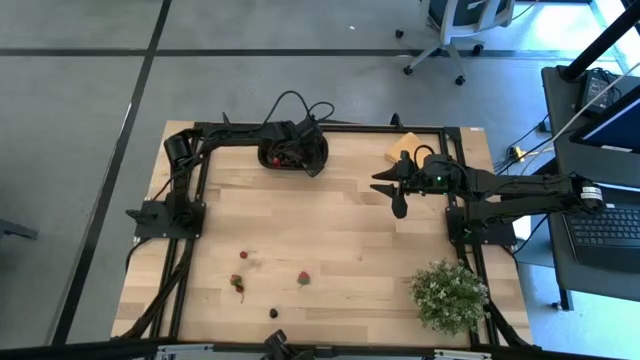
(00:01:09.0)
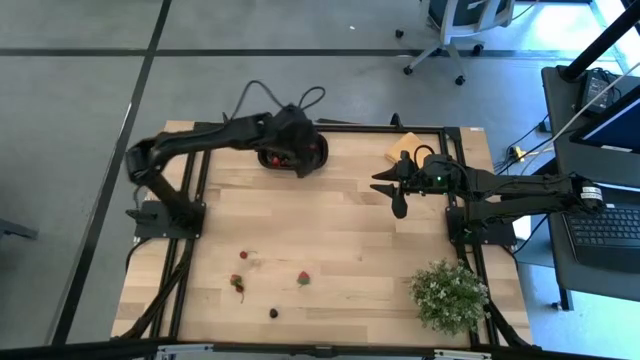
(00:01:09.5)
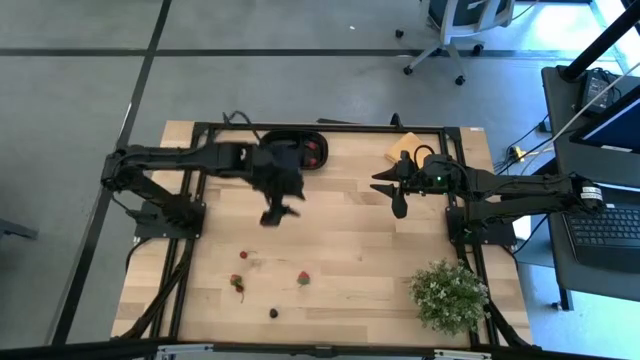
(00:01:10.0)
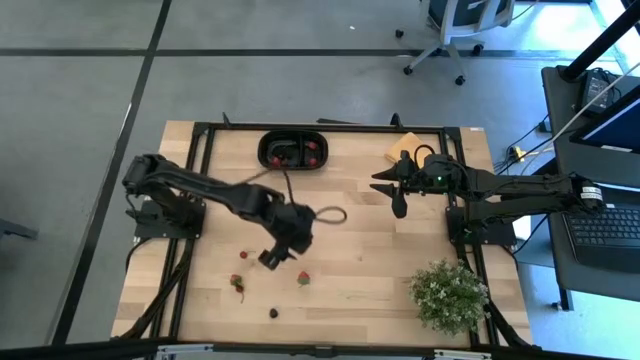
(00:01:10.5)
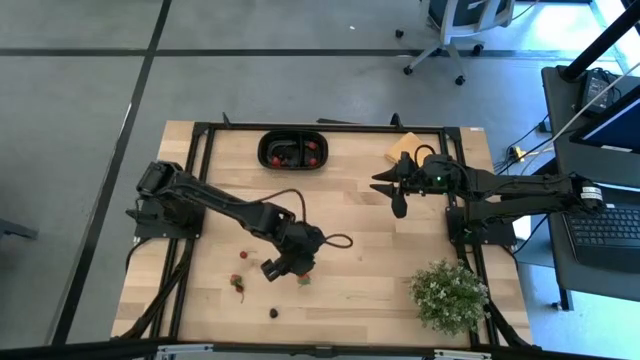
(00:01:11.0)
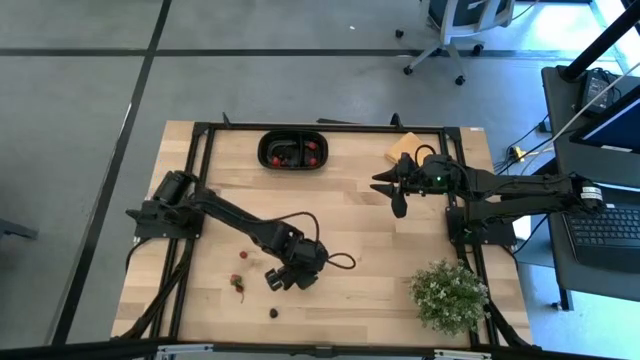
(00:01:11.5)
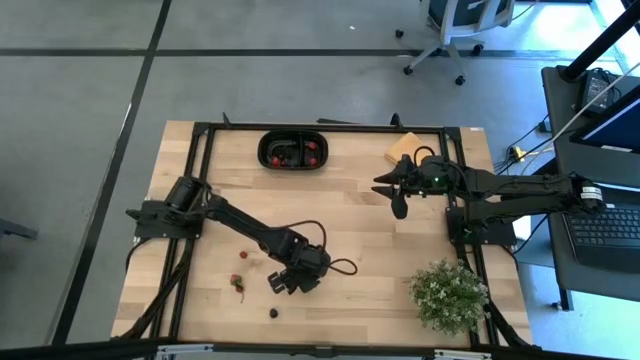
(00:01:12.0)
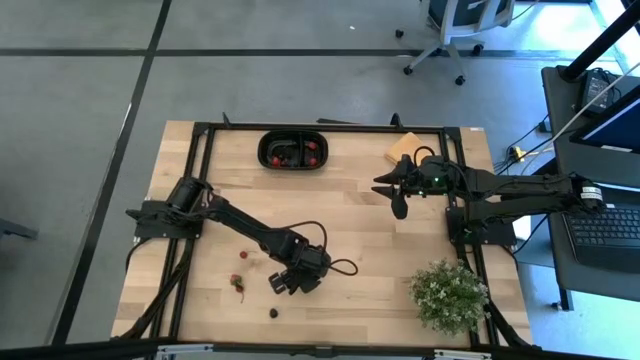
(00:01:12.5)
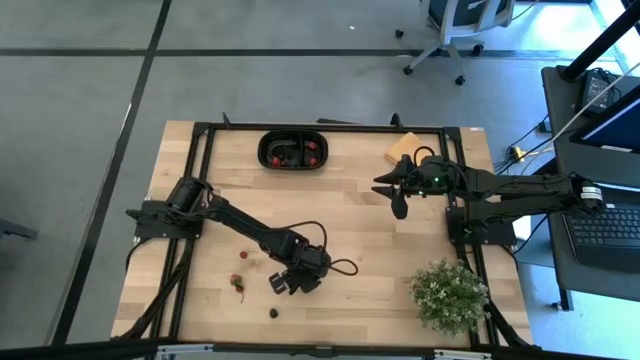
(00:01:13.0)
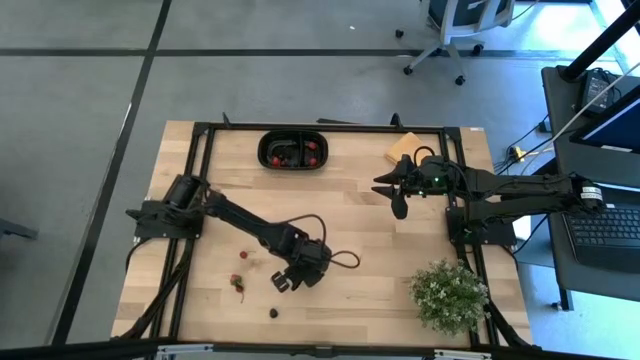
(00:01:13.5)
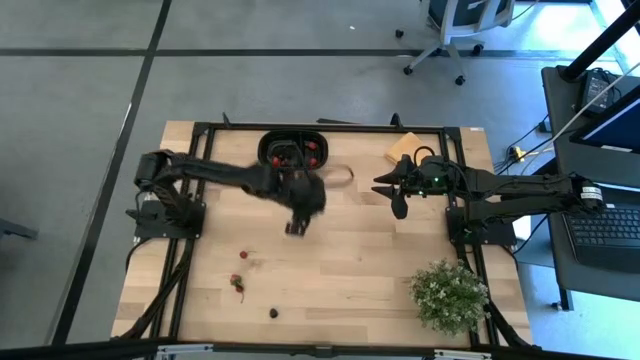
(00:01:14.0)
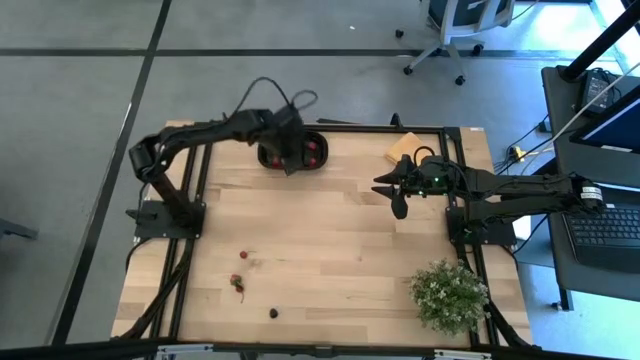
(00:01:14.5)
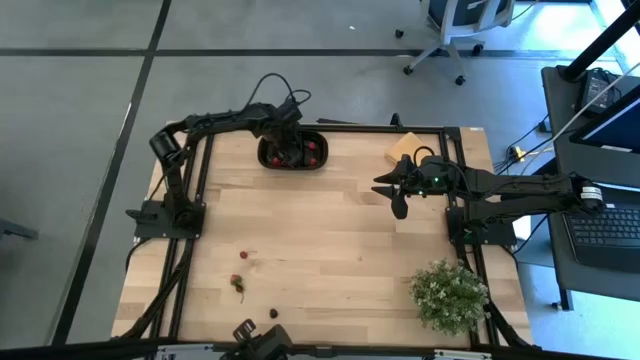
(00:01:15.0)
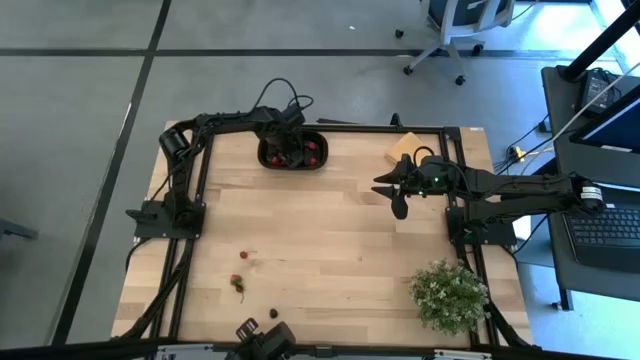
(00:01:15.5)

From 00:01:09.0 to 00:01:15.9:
Task: Pick and placing Produce into tupperware
Put the right strawberry into the black bin

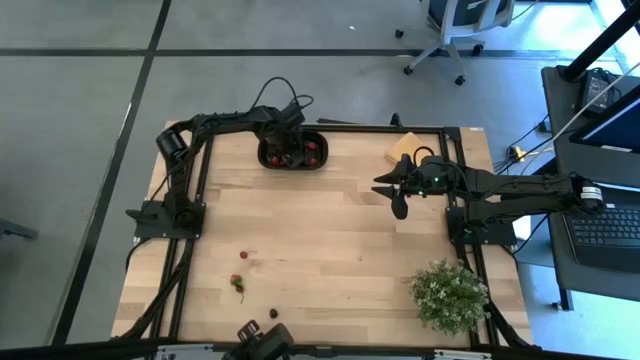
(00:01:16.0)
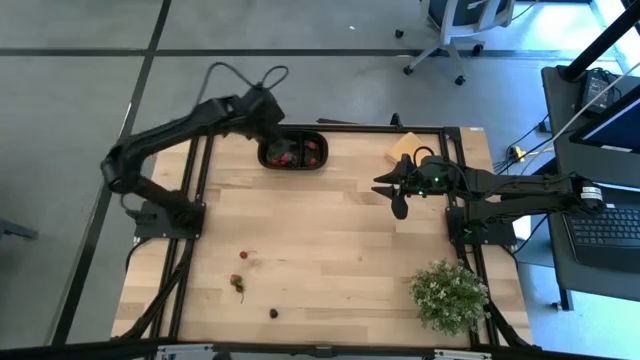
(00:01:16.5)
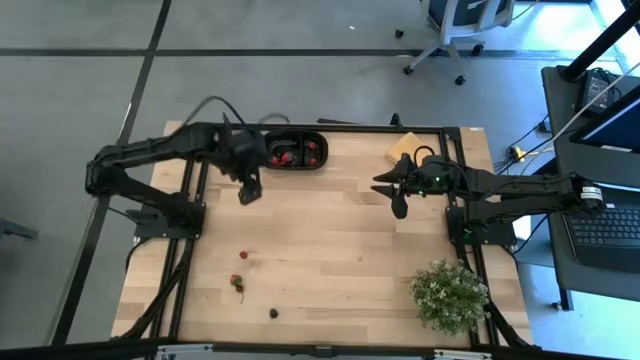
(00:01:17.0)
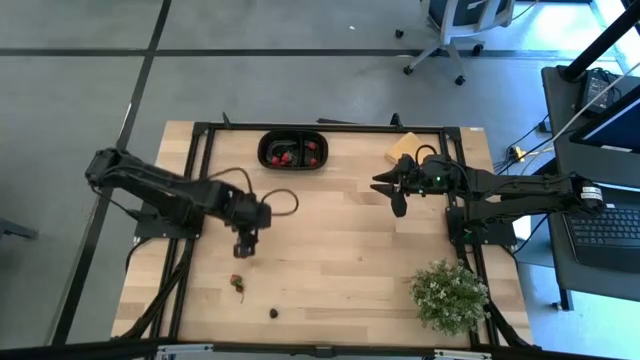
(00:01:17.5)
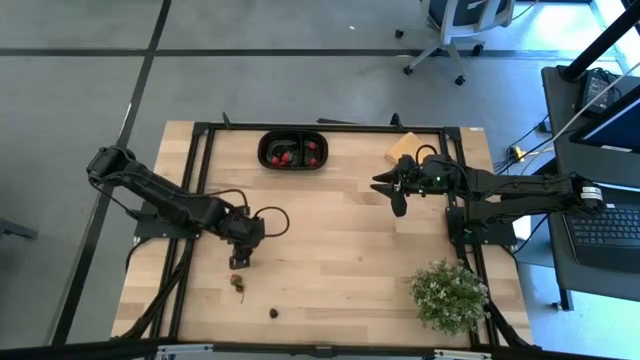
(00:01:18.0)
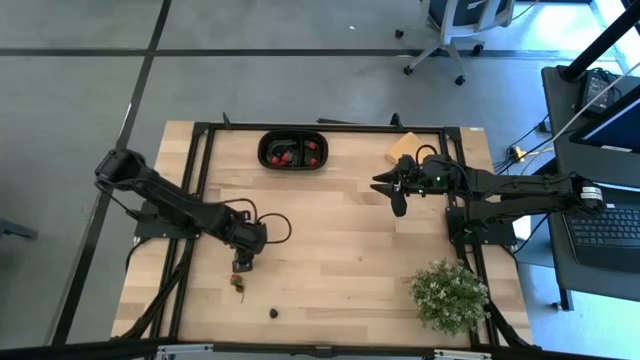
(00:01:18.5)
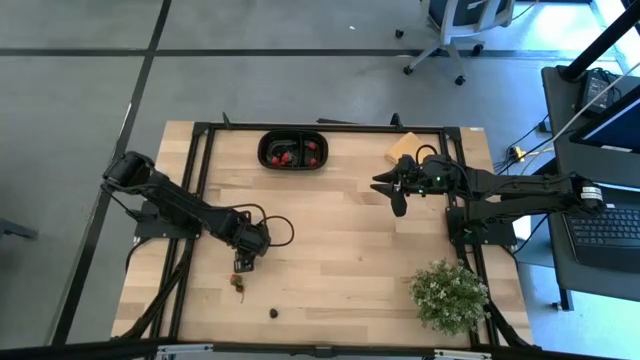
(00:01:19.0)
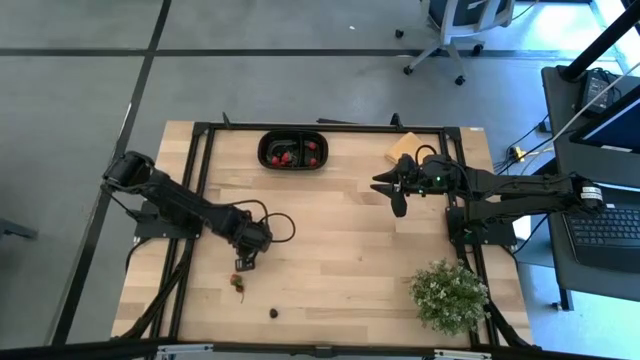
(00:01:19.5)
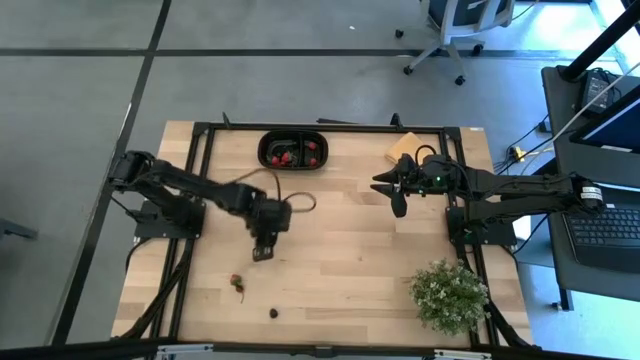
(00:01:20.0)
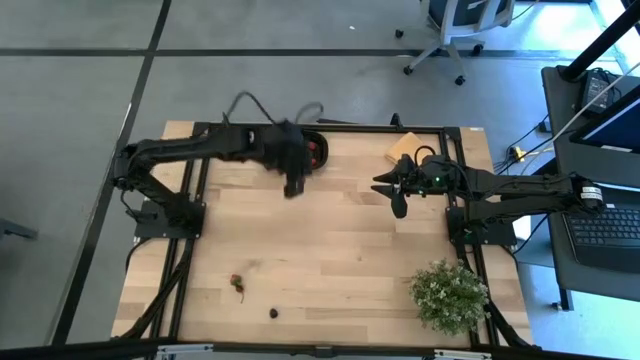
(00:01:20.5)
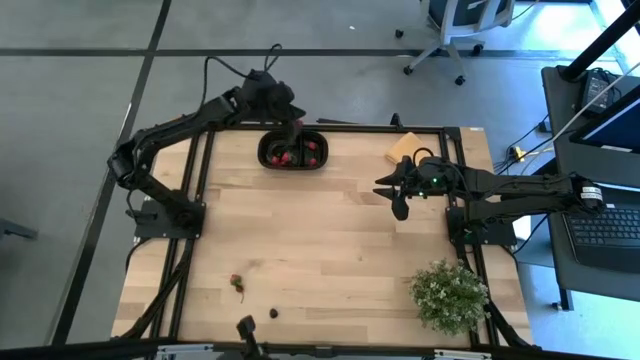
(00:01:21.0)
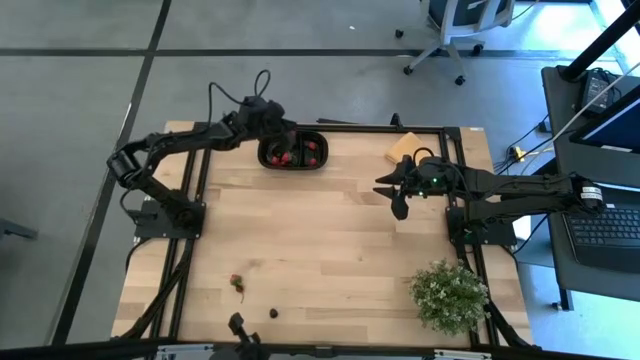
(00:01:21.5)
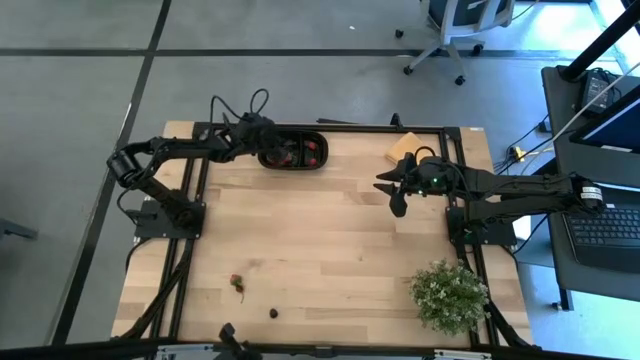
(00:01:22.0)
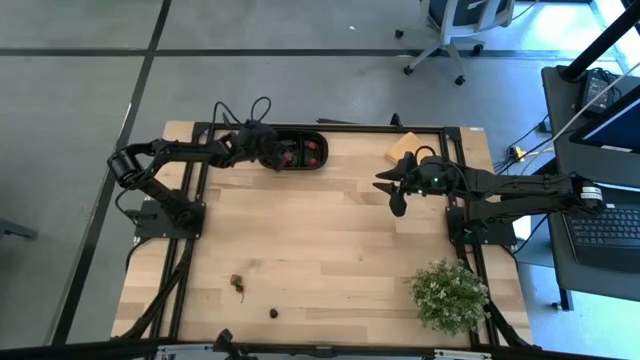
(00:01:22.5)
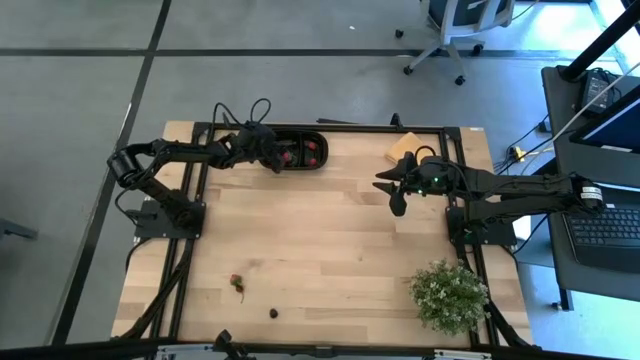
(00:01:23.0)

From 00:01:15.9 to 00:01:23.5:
Put the top red cherry into the black bin

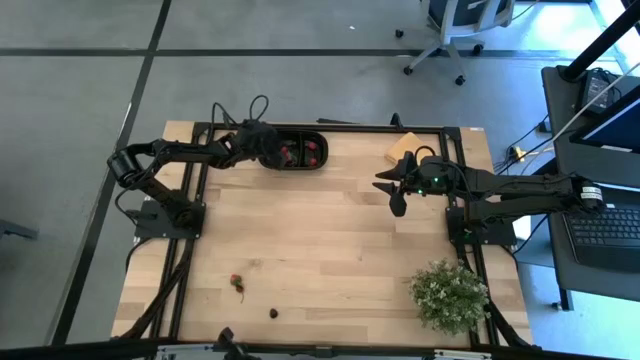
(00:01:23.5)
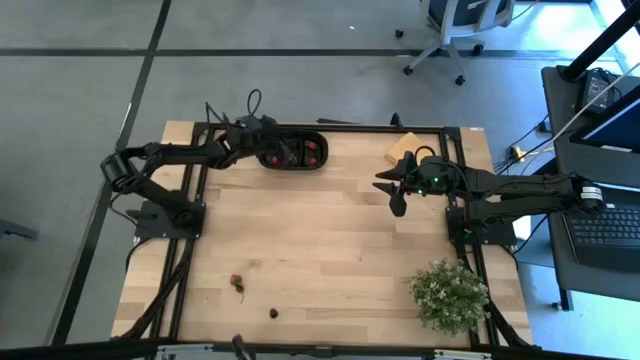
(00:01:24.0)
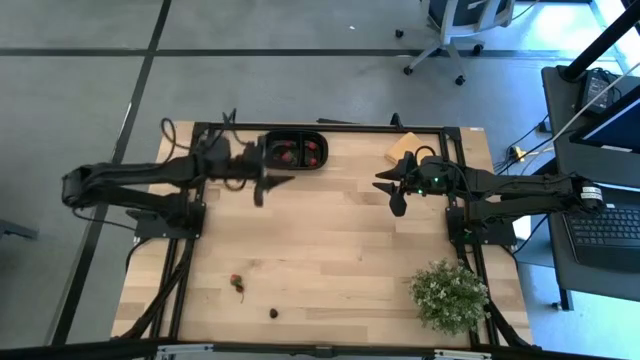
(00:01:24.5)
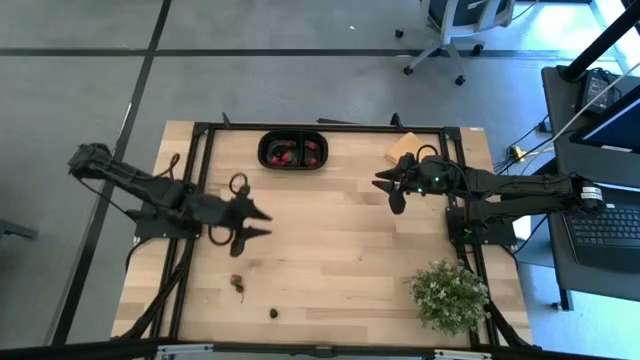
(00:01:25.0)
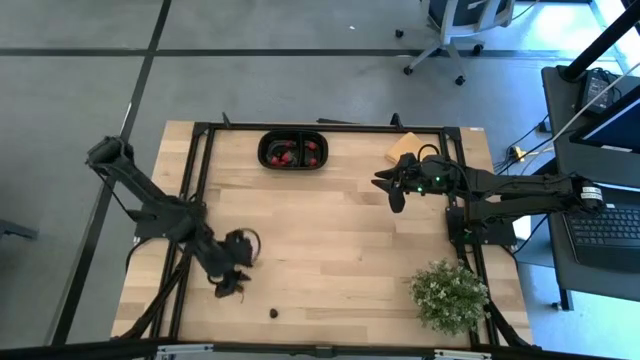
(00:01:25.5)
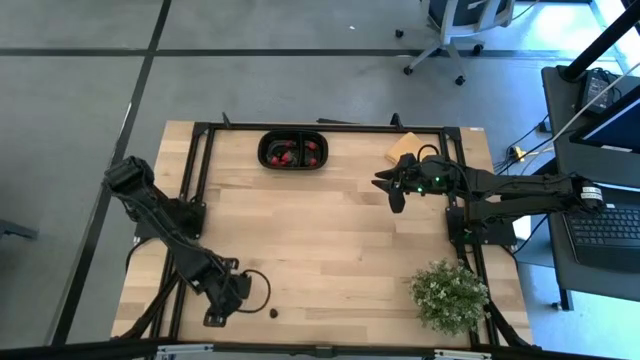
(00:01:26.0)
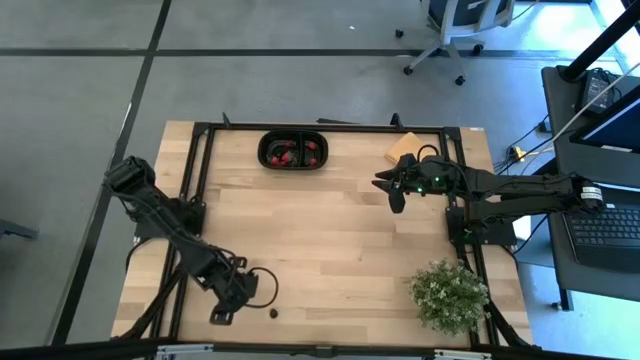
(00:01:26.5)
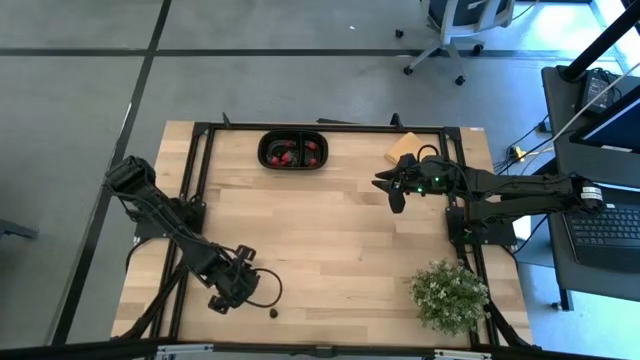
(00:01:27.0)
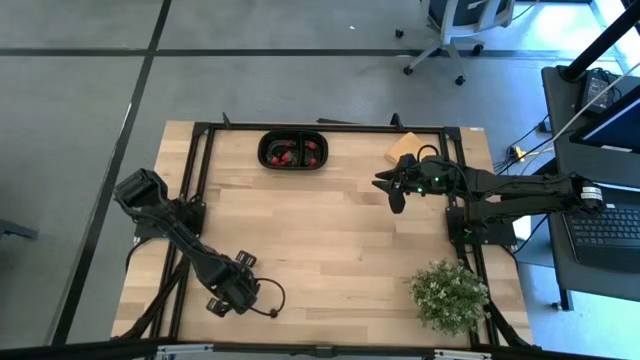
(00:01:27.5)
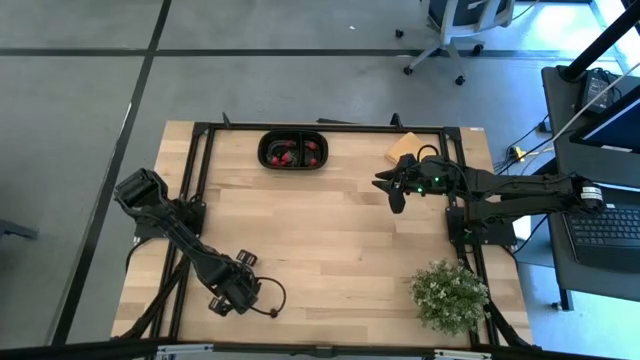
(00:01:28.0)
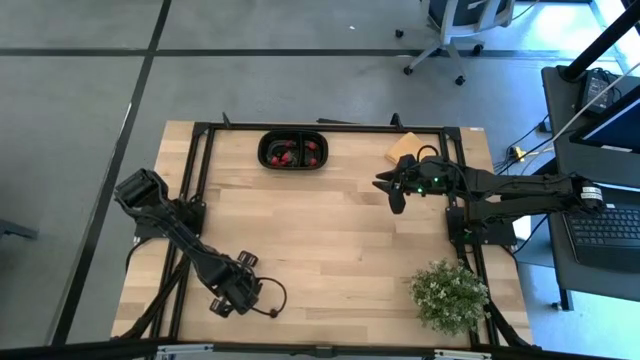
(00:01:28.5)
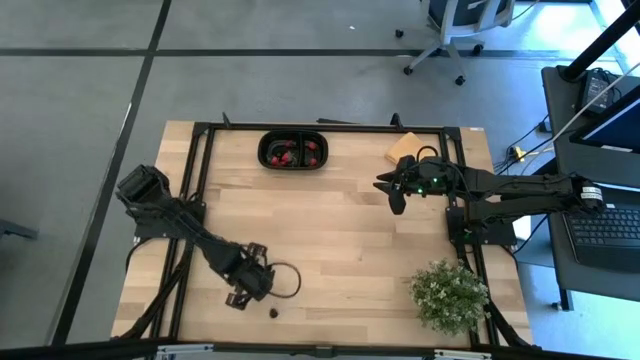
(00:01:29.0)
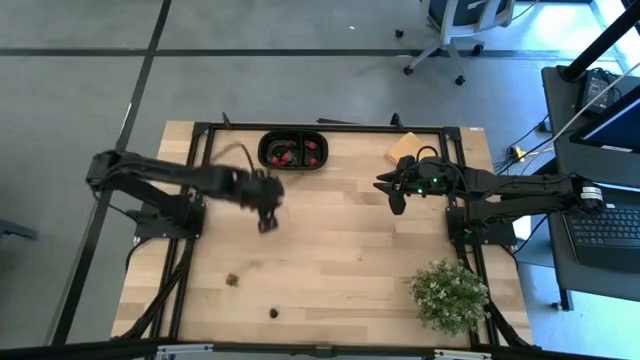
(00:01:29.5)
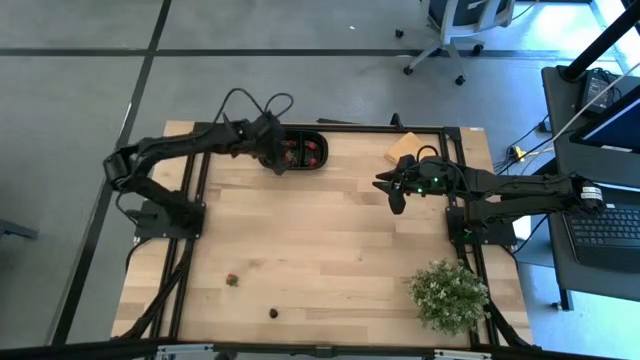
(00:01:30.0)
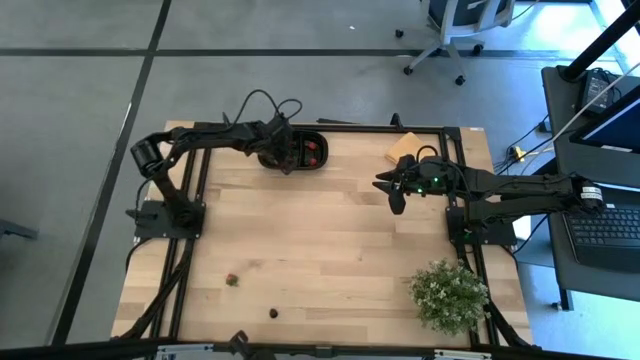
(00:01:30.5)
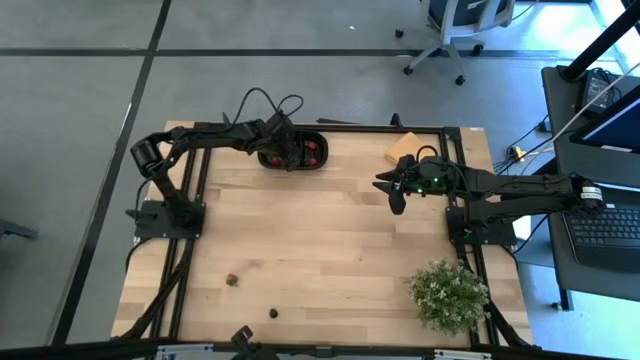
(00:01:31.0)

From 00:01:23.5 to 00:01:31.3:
Put the red cherry into the black bin
